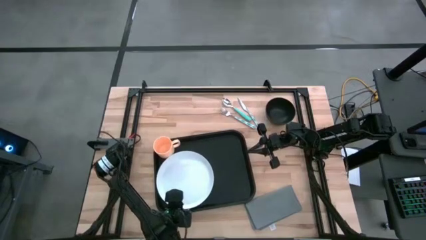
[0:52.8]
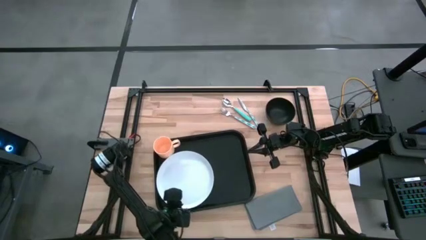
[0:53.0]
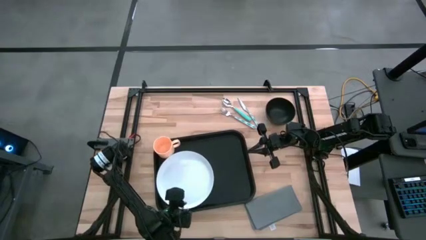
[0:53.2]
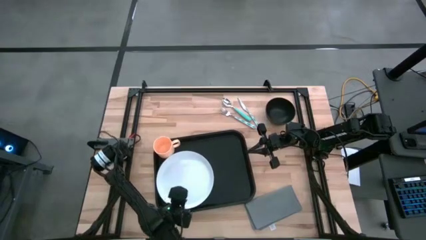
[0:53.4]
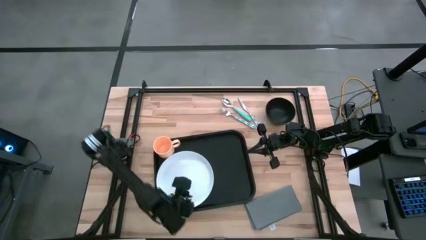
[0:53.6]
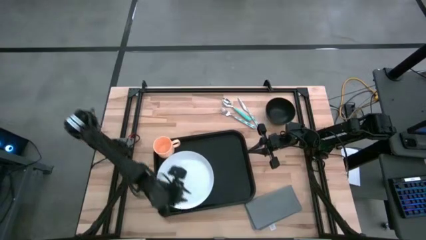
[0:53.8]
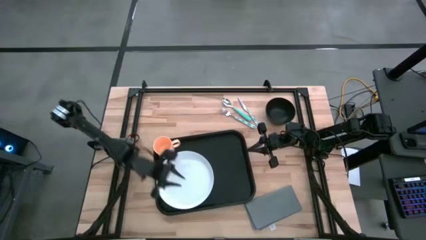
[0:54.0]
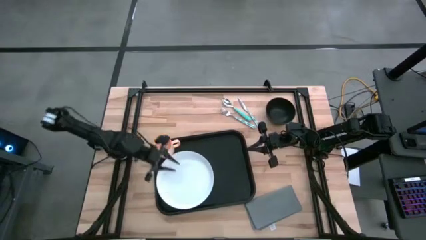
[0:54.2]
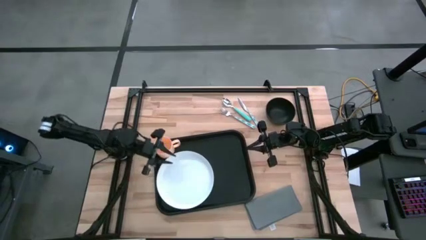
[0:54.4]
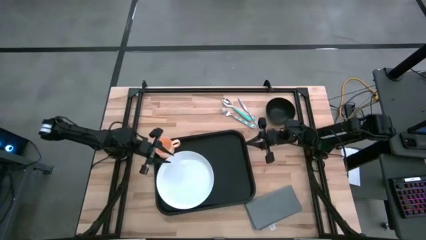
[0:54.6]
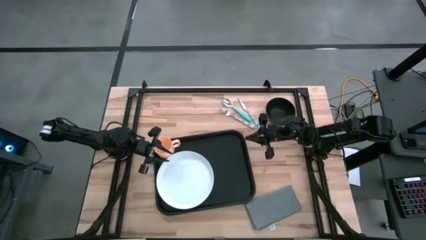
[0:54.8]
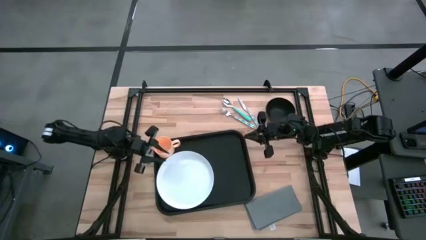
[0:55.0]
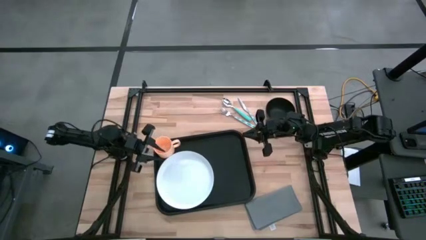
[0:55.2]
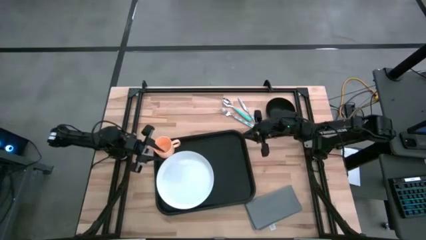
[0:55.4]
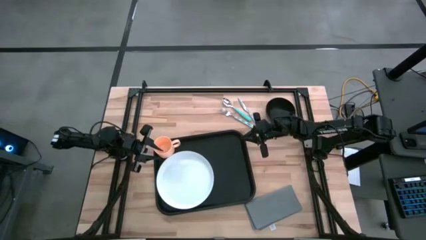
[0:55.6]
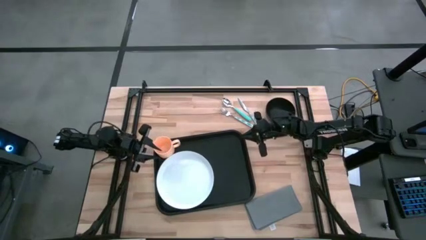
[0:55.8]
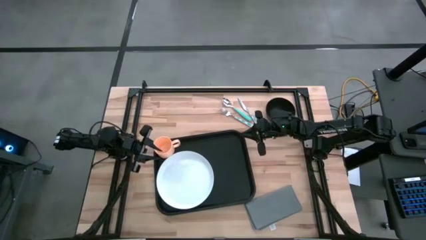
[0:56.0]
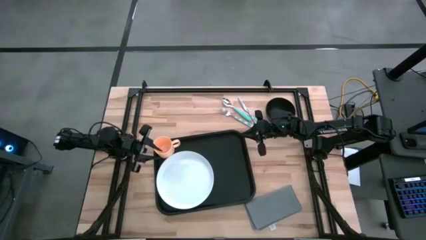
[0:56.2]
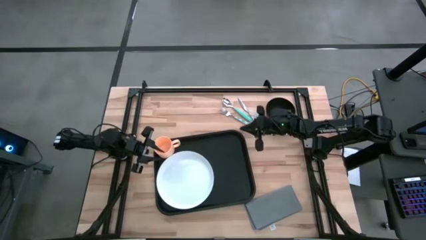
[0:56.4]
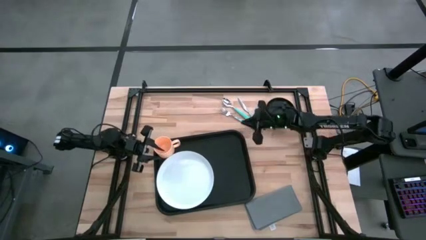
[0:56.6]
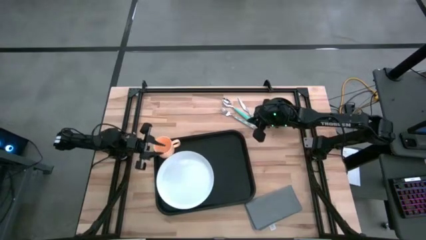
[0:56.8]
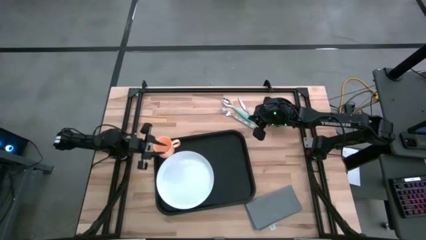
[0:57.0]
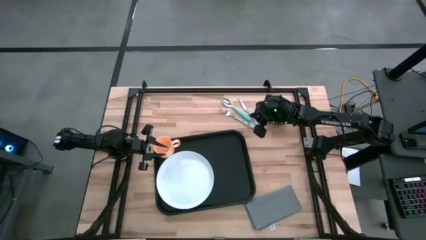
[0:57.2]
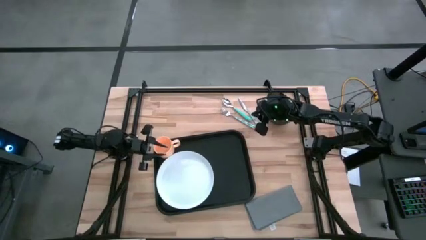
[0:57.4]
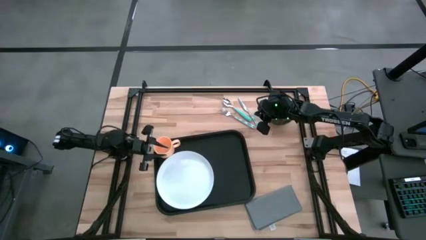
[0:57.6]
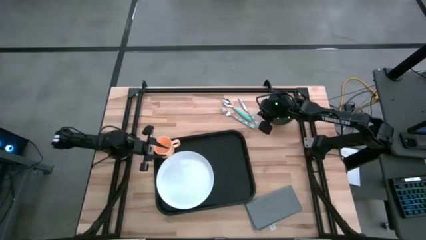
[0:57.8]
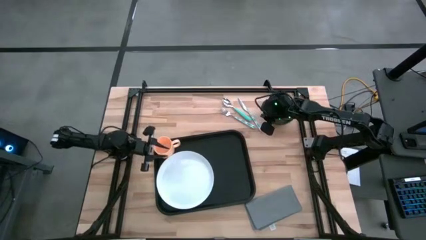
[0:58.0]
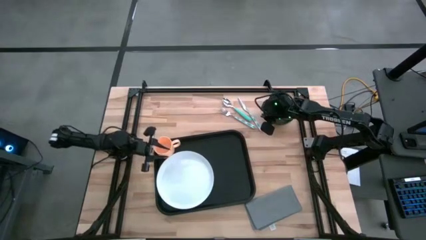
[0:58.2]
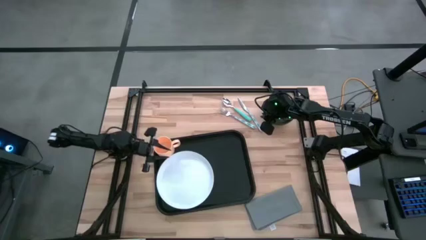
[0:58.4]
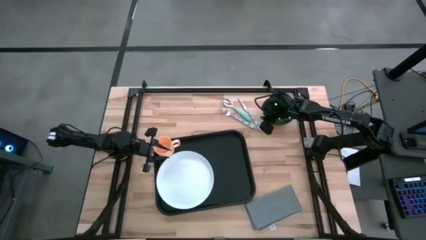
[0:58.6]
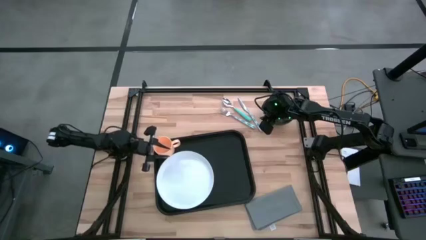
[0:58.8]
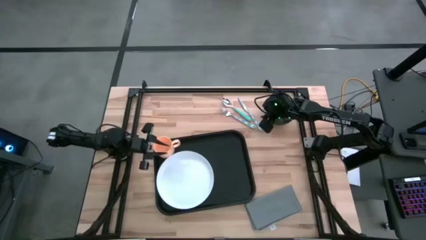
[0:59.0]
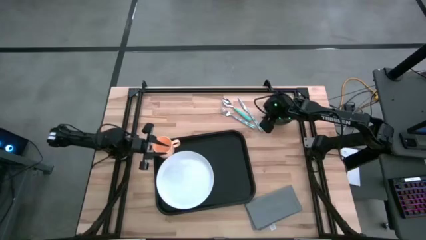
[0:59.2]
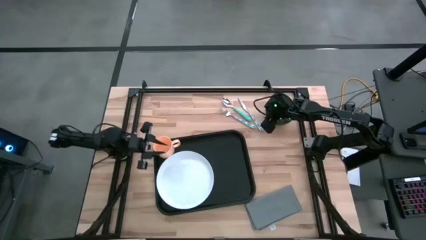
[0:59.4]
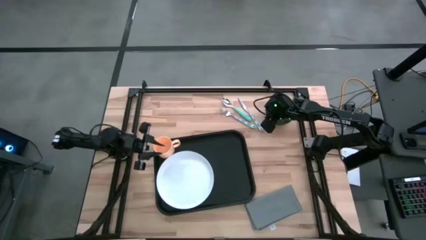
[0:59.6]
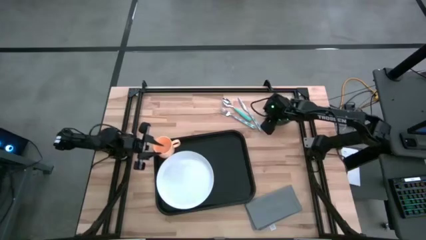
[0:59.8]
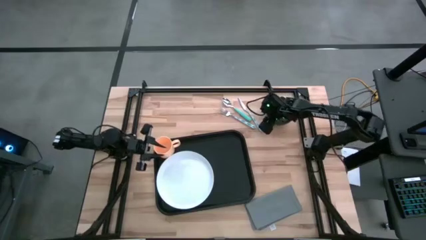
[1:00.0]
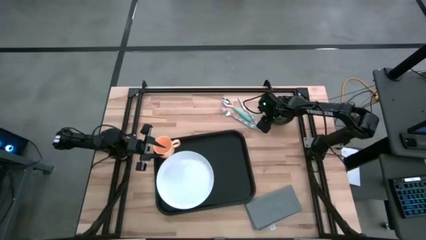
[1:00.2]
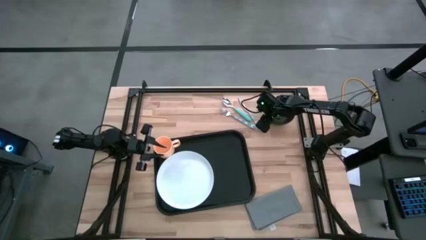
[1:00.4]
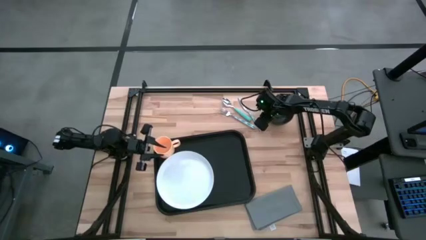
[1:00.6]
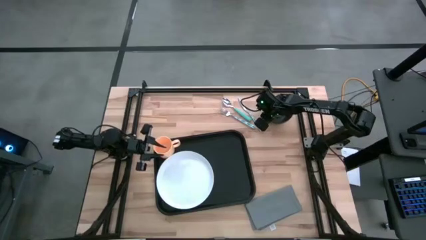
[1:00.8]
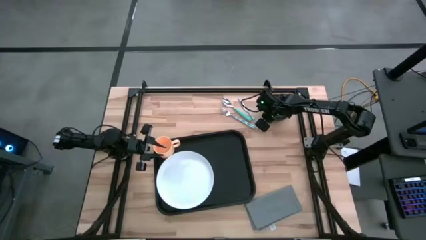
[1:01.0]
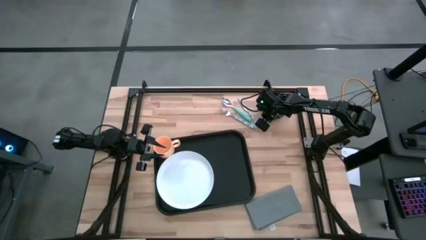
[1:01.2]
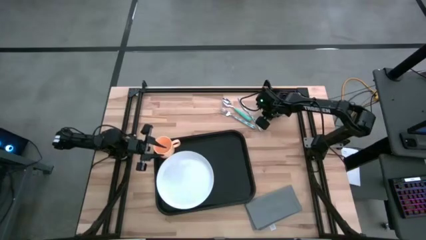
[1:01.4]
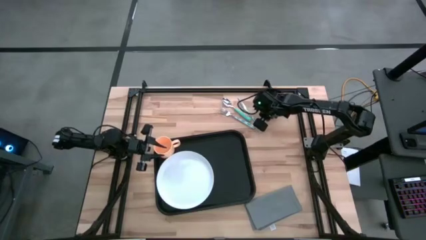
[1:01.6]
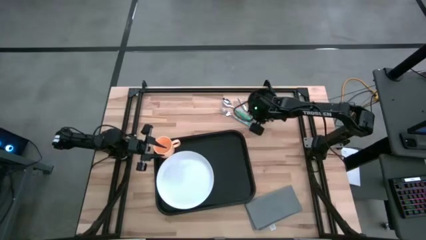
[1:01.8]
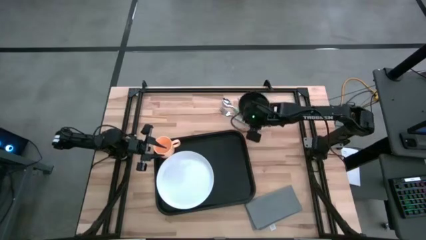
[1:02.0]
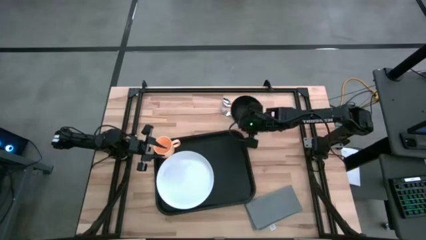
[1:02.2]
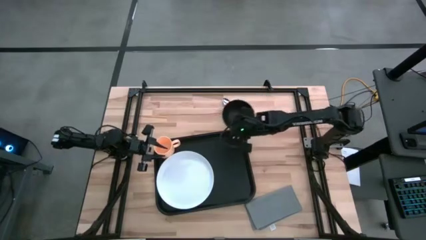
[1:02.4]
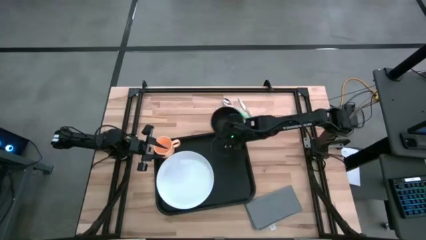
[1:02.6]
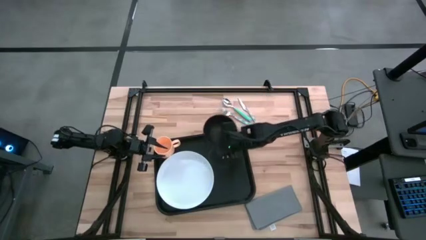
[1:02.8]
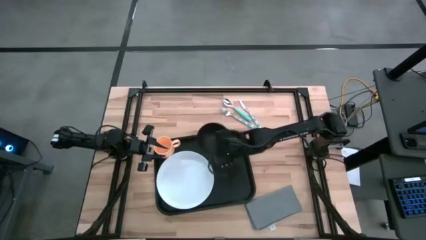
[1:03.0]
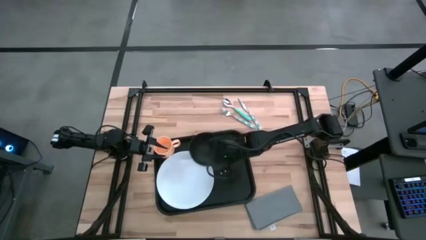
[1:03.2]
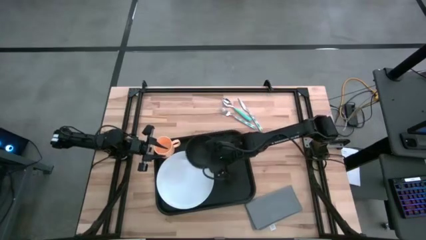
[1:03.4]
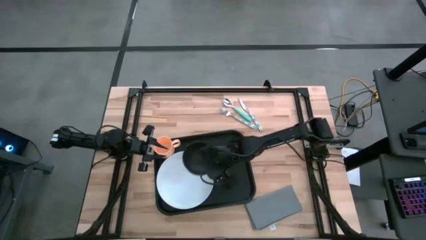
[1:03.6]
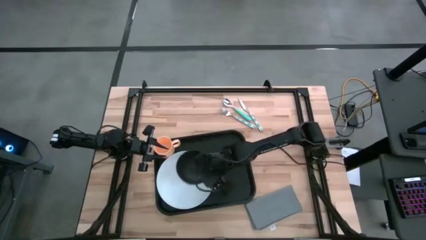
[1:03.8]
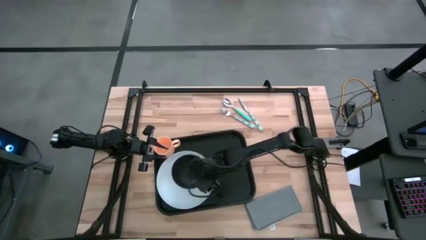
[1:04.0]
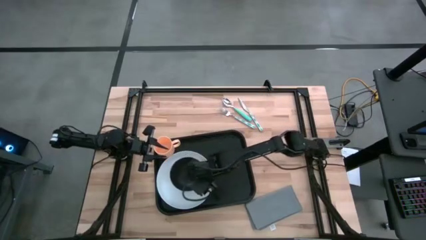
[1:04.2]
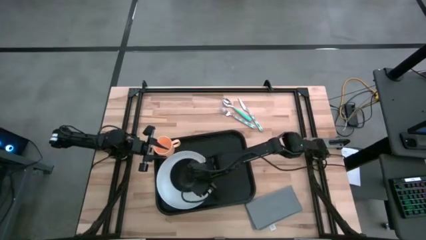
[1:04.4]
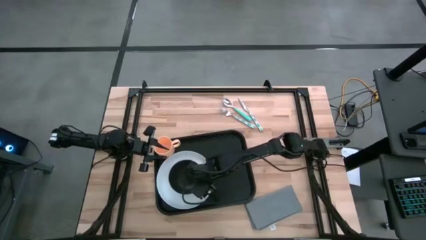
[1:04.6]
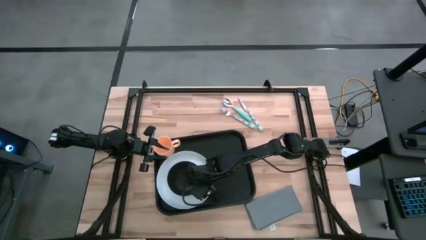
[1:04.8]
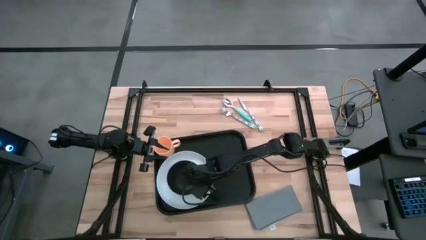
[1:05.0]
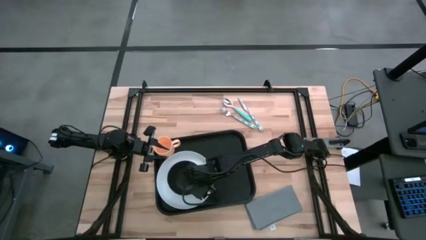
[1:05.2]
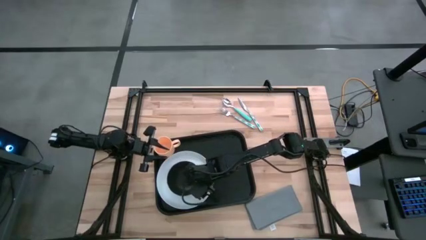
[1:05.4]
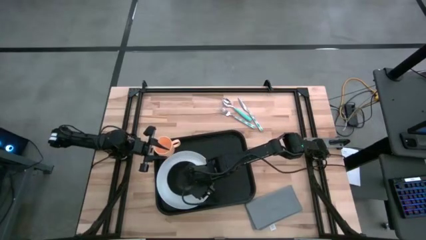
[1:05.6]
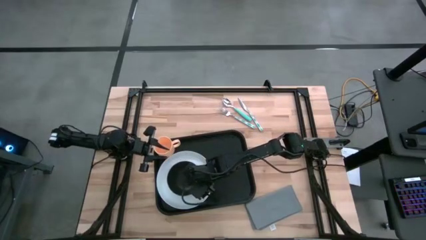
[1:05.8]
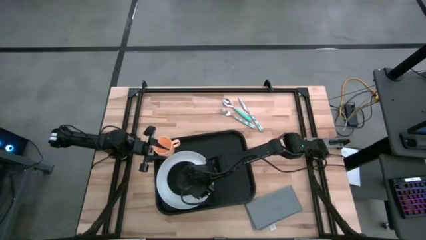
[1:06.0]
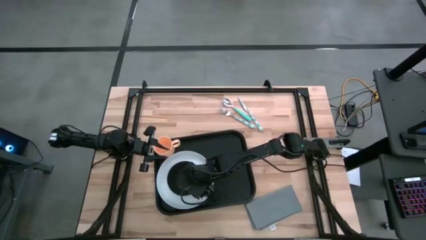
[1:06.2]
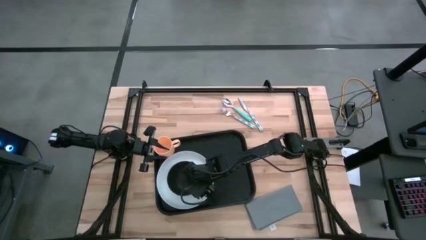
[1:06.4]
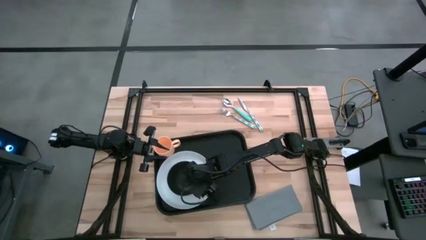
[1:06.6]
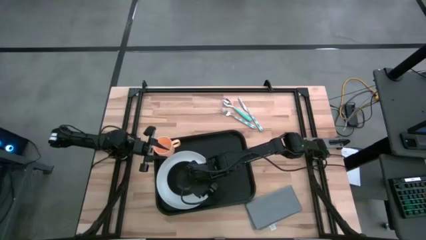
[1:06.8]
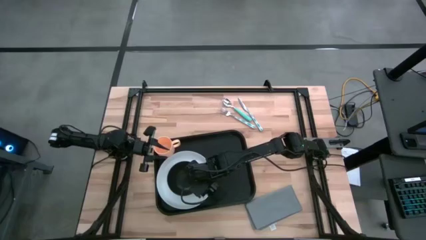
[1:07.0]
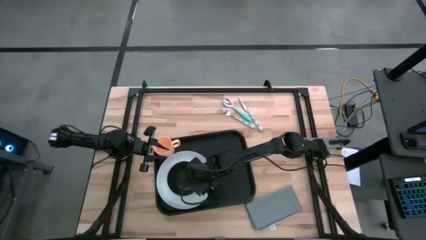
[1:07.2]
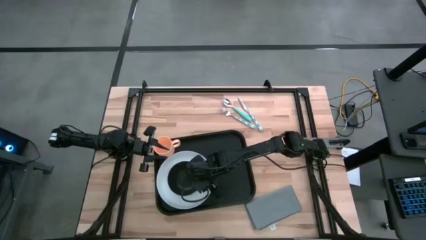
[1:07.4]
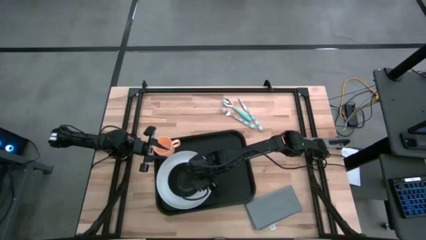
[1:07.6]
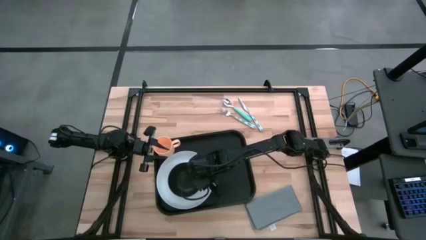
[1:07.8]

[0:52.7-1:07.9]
Task: Set up tray
Put the black bowl on the white plate
